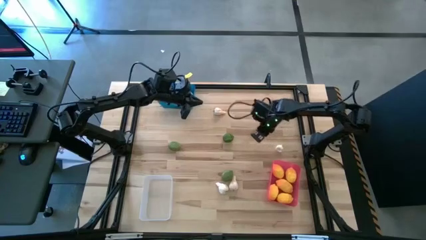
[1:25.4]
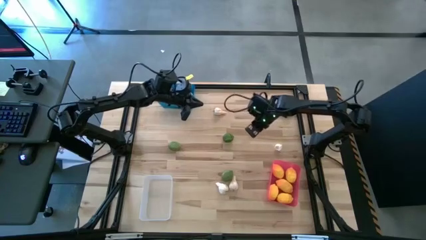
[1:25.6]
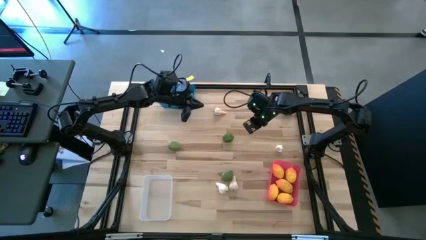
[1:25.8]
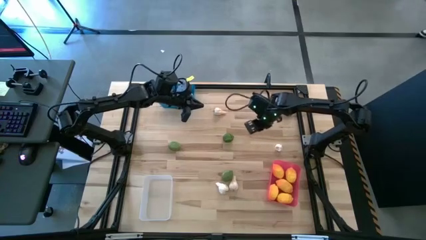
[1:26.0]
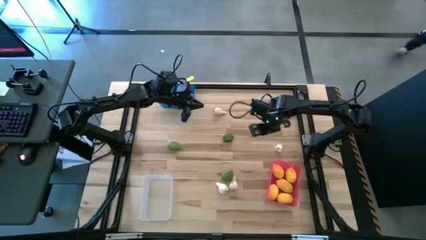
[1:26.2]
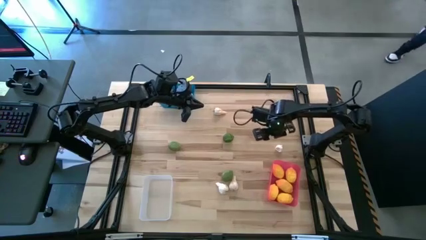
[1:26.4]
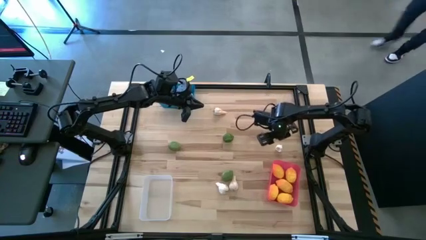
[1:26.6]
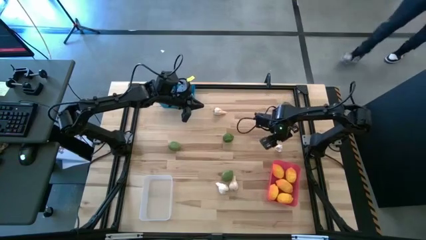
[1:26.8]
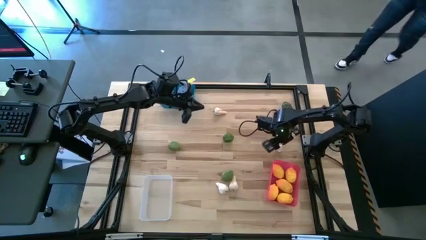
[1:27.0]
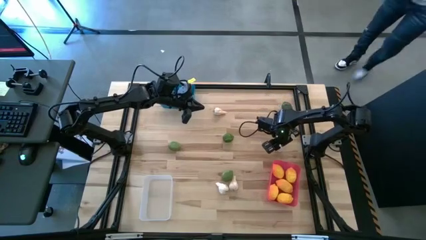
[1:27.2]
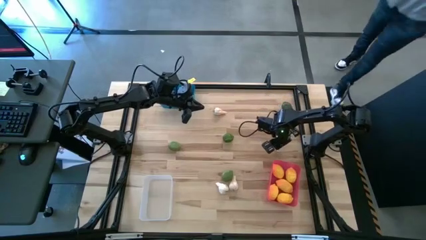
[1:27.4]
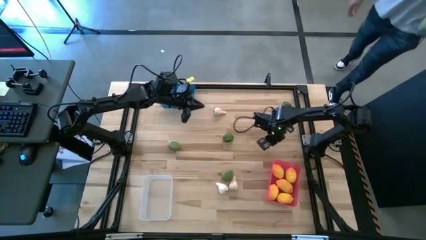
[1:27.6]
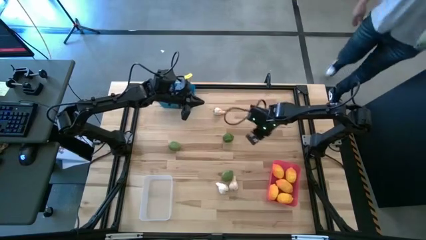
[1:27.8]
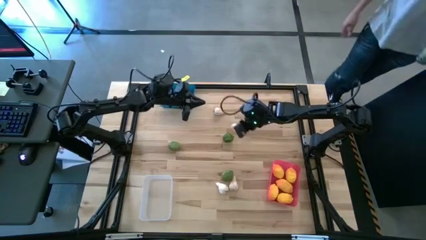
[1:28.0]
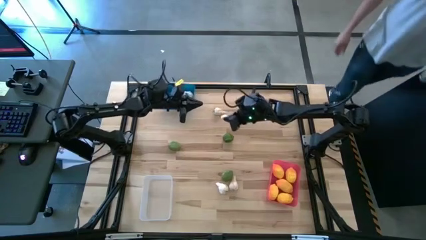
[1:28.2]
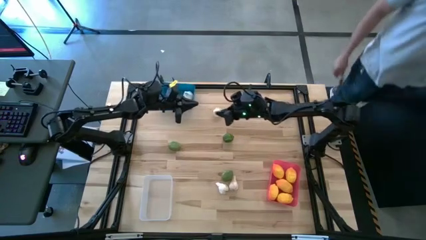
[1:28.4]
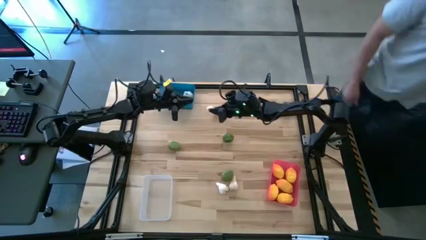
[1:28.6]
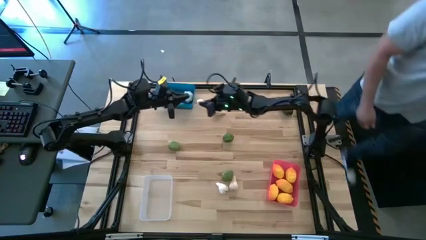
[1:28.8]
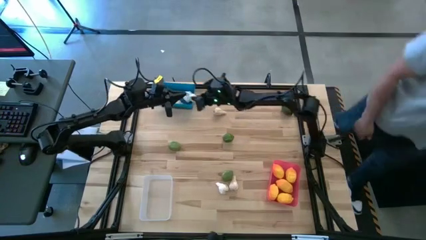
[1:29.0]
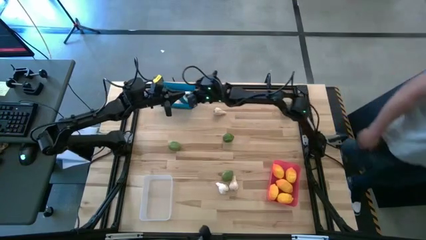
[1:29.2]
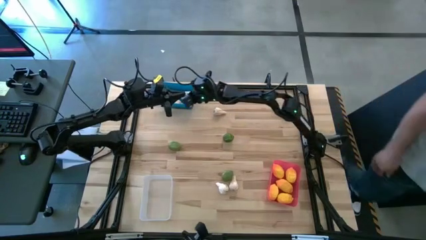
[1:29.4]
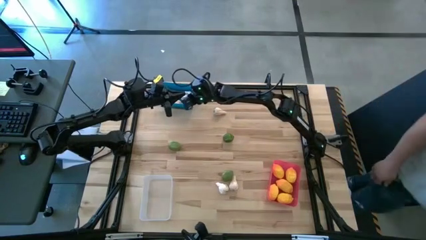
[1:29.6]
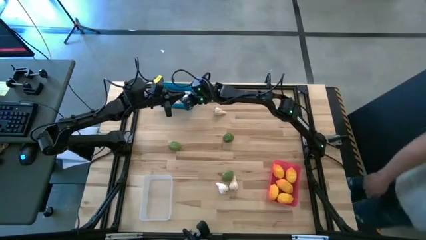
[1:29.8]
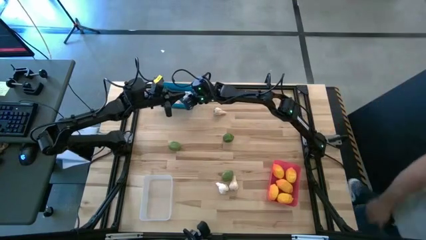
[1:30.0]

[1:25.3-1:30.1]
Task: Sort produce into baskets
Put the garlic into the blue bin

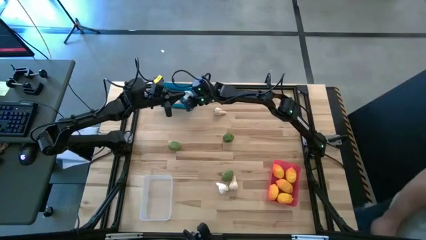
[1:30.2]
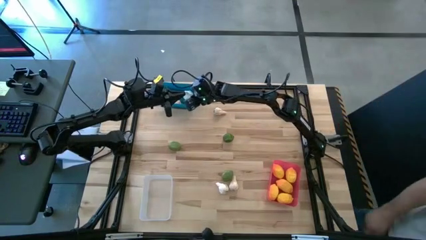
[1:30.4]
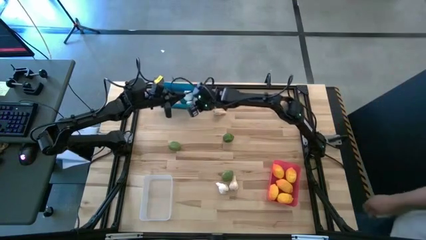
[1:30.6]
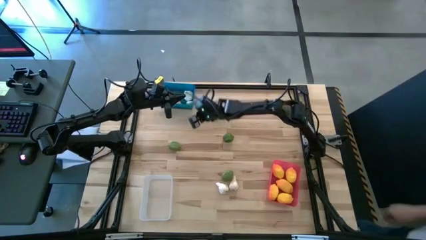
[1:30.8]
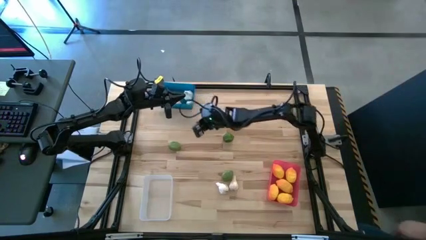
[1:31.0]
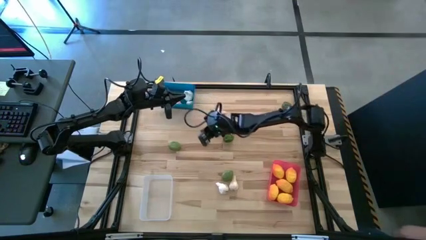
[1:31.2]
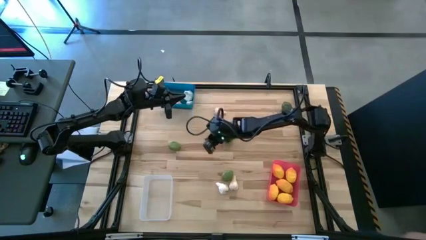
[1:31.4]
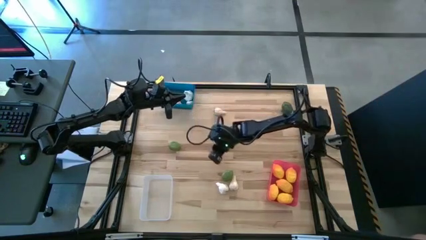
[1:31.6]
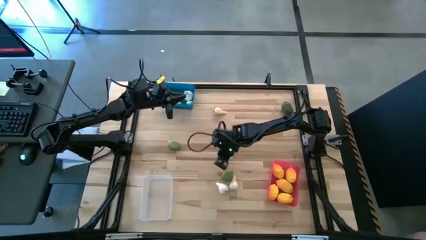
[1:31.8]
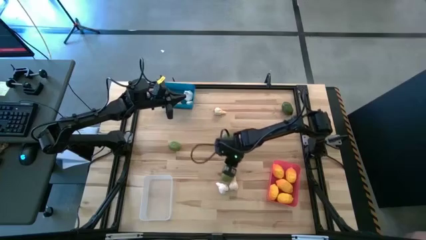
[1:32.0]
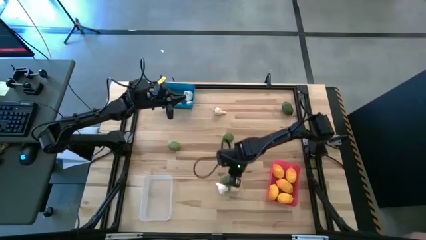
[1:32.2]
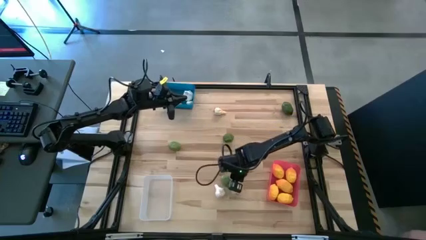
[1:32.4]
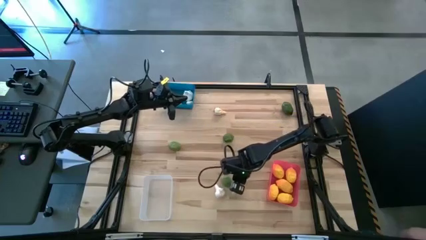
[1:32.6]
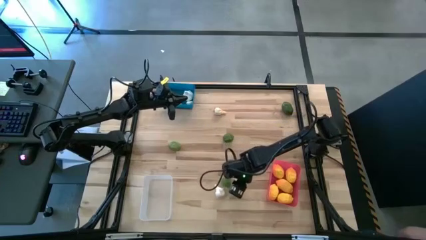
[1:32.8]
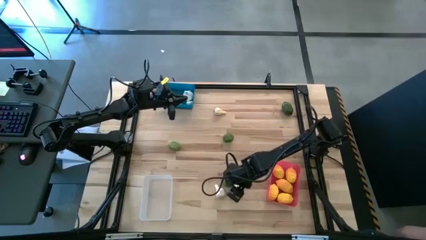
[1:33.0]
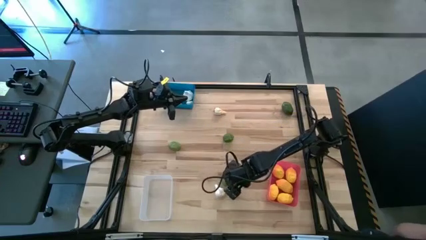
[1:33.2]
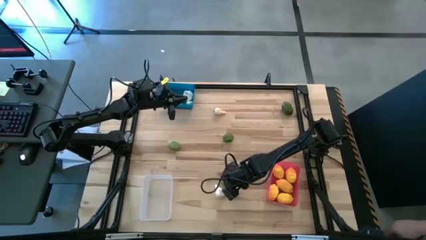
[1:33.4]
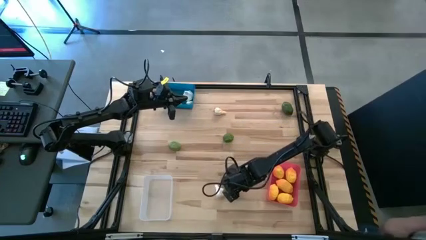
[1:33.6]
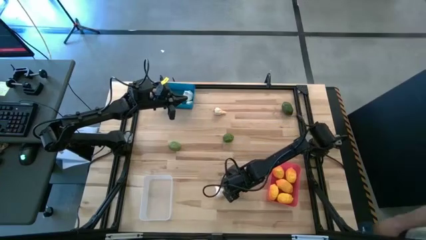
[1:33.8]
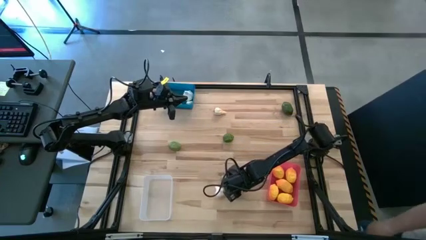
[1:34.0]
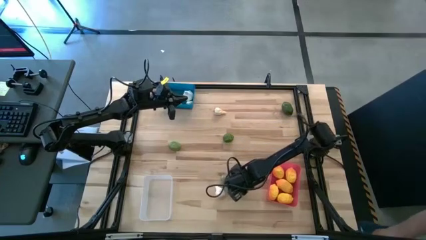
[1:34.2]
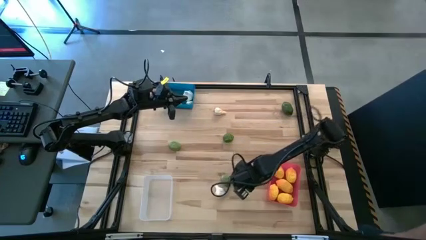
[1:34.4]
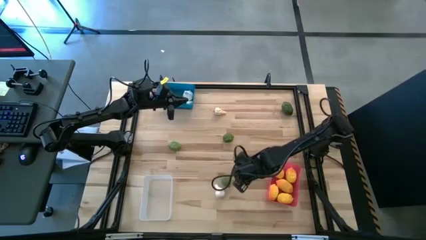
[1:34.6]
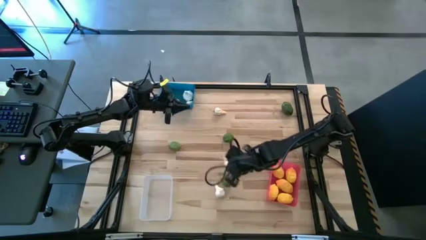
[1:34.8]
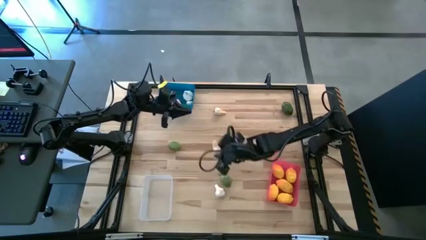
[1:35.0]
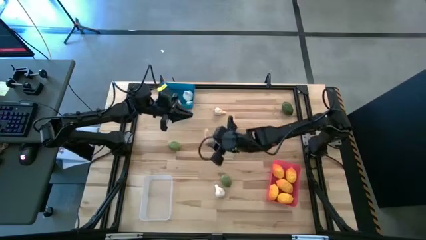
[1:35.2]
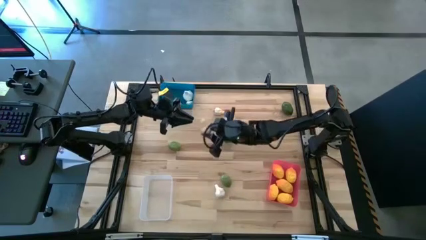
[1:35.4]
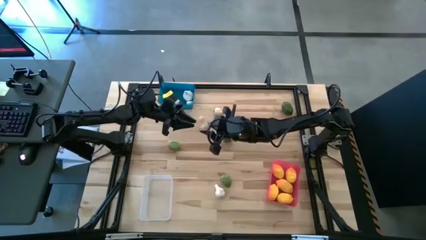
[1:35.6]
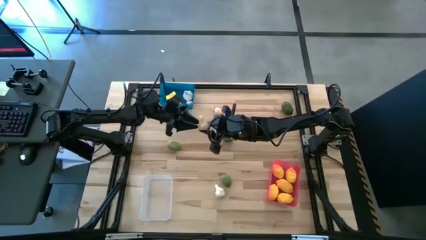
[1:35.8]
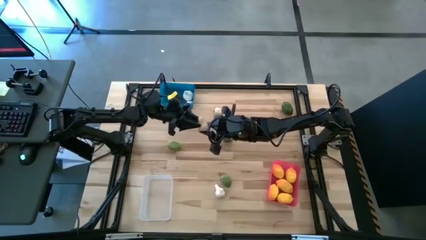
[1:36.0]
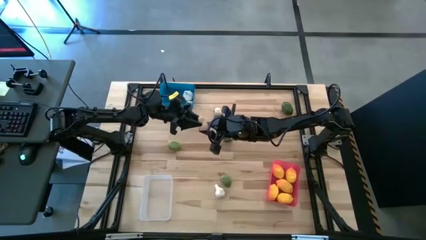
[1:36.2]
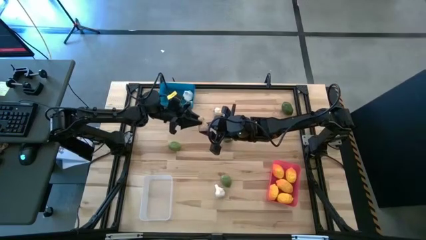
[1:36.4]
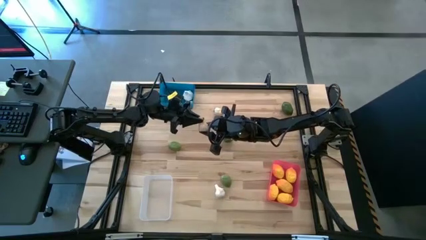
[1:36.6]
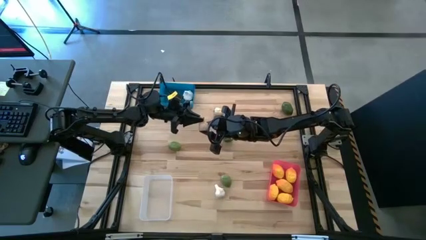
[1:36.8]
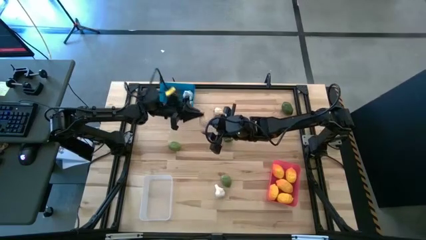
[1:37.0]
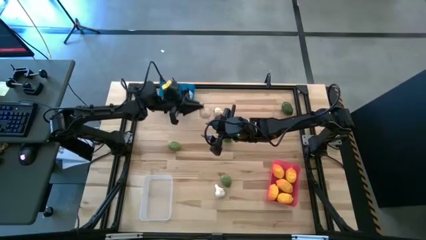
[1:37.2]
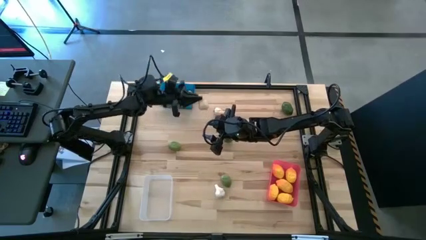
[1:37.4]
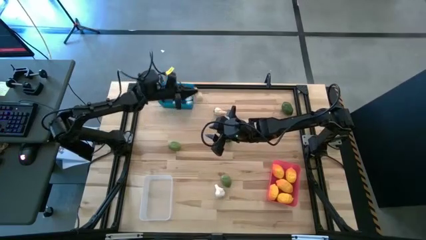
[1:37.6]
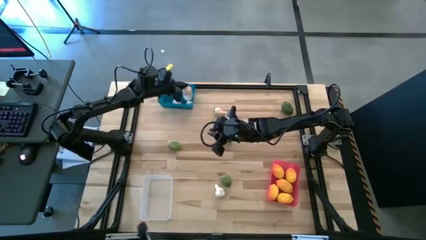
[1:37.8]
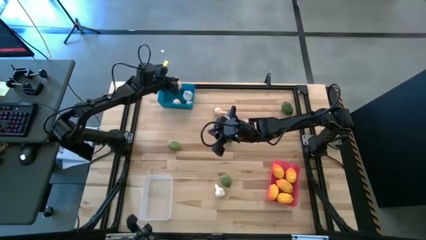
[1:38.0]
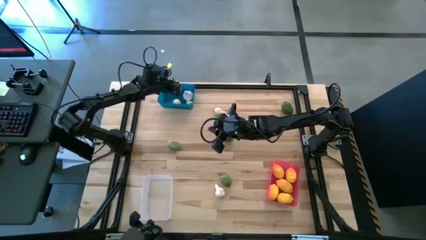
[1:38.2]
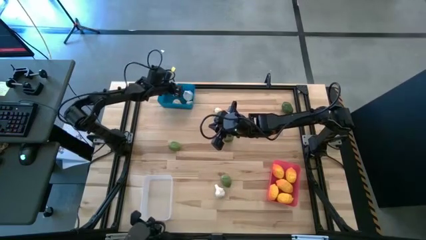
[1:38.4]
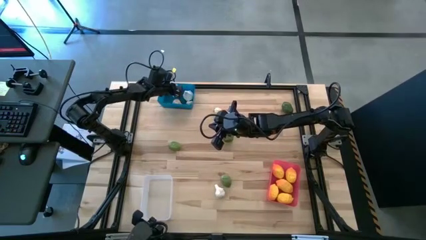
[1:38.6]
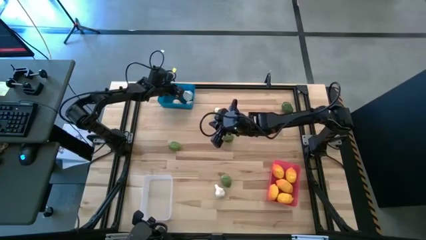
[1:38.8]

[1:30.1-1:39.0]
Put the garlic into the blue bin

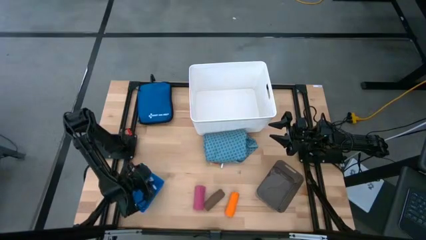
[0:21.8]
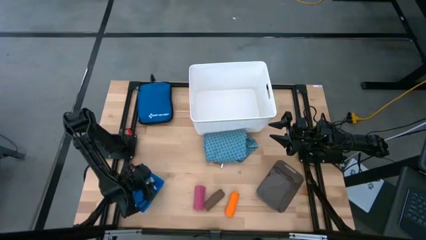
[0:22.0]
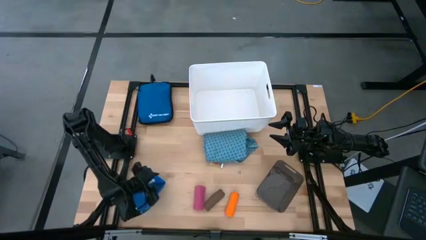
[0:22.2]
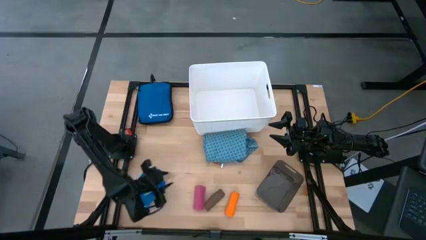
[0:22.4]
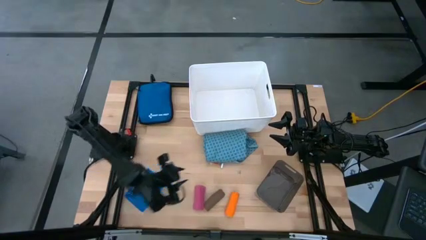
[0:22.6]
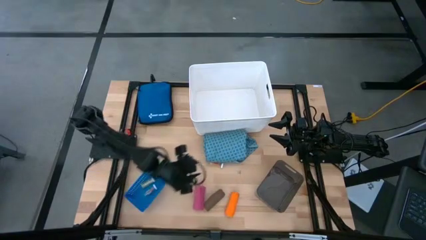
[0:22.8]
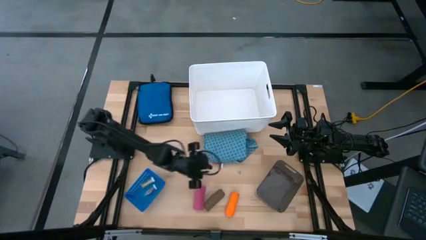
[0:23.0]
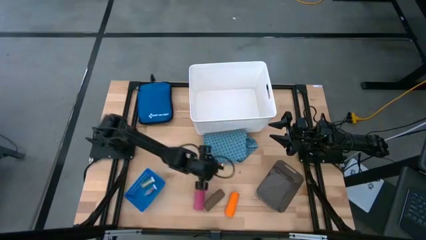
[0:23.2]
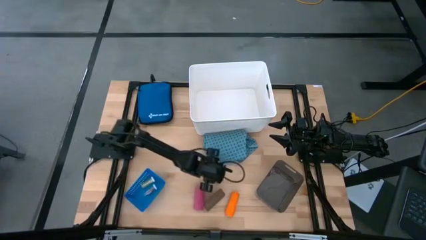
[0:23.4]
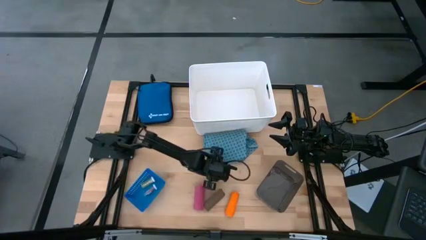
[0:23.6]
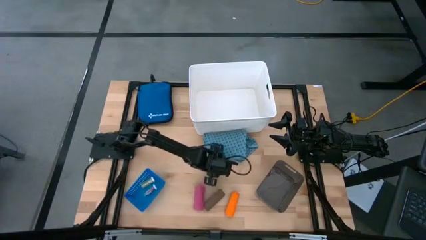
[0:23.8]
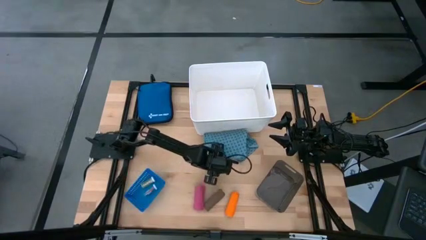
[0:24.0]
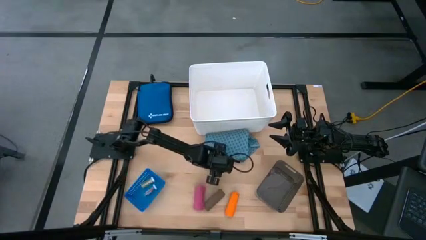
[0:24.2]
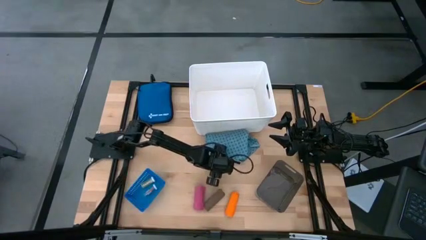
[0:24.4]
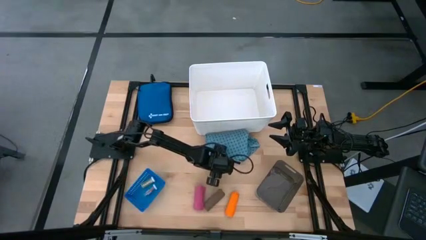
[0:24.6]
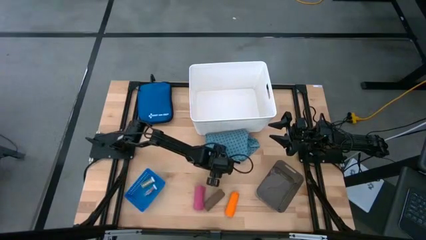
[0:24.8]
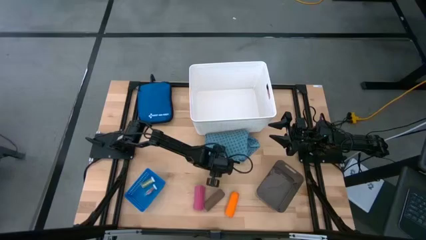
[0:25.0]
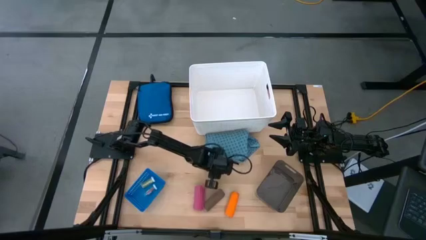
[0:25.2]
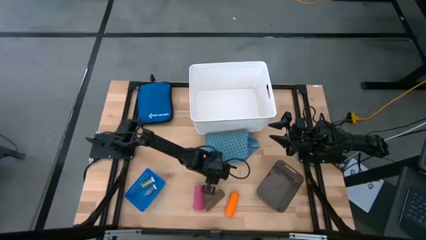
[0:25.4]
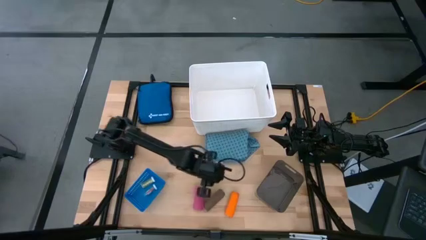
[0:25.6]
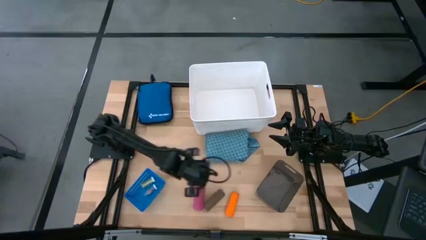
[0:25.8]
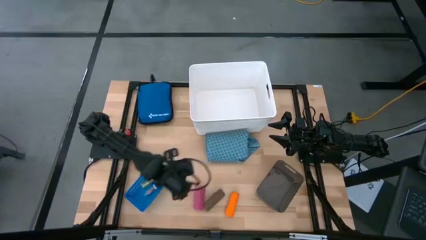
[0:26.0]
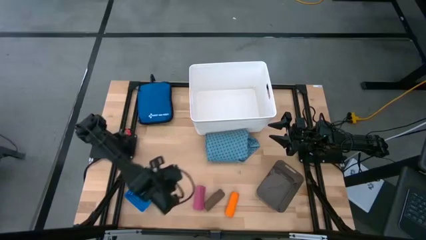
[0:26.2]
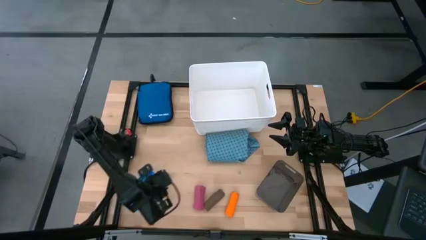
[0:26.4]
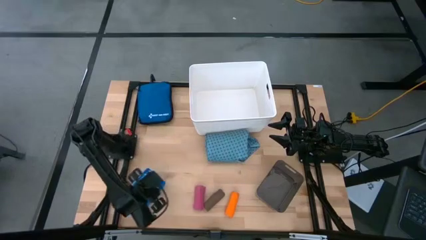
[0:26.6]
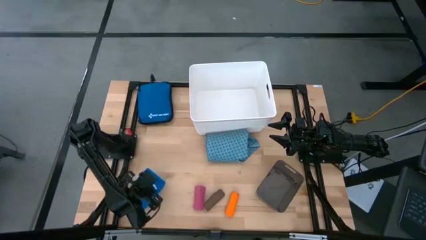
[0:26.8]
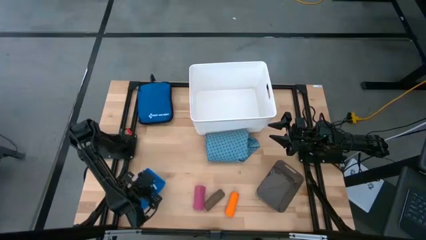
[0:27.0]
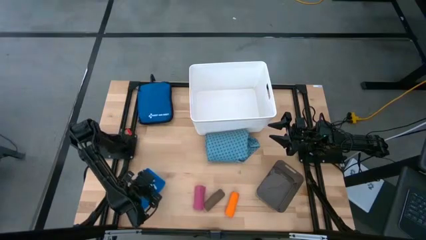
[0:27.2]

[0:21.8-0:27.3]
Task: Pick & Place Medicine items
Put the yellow pill bottle into the blue basket
